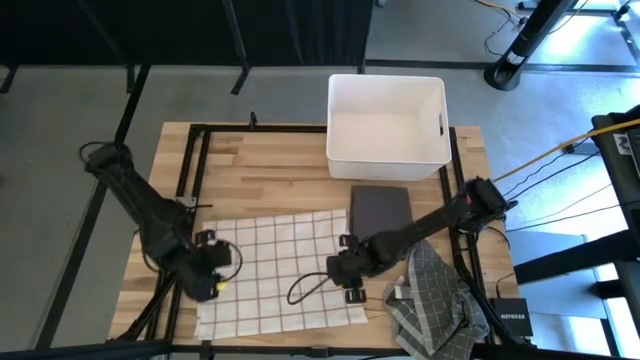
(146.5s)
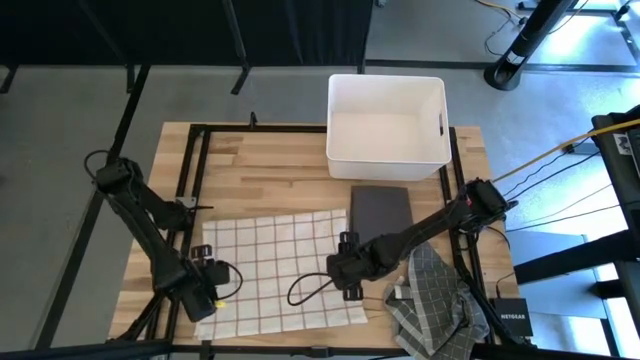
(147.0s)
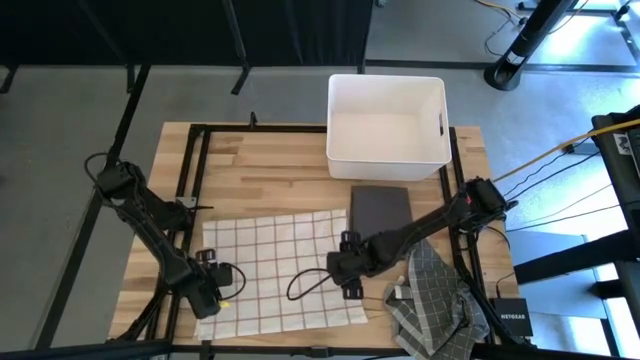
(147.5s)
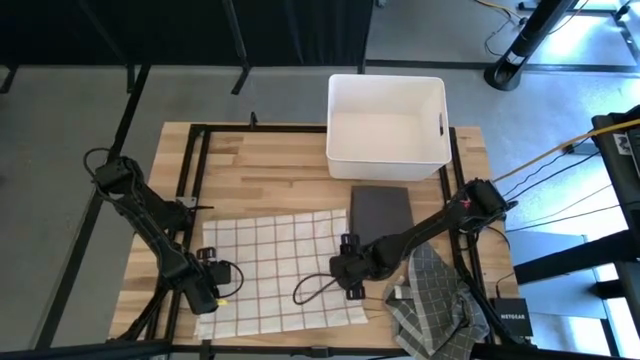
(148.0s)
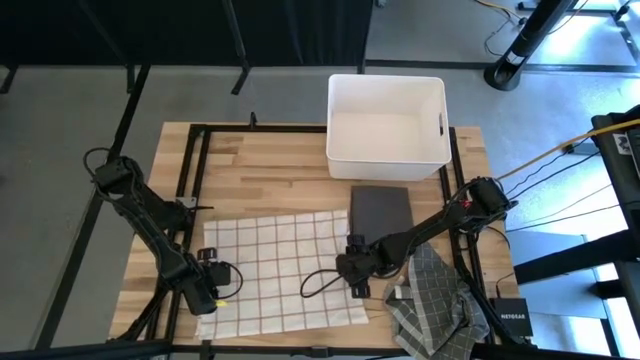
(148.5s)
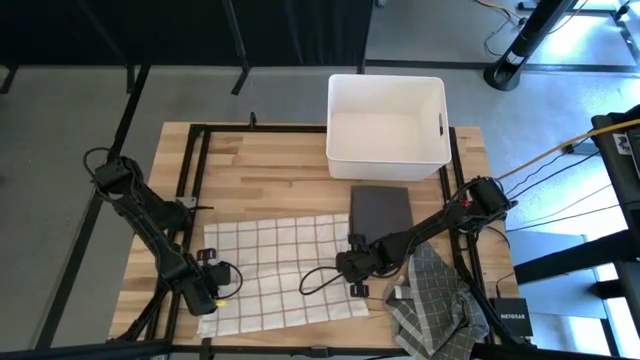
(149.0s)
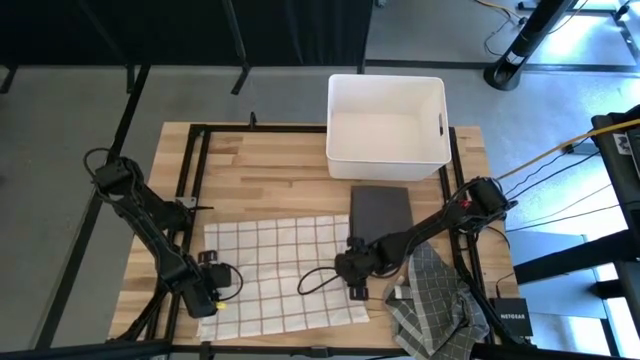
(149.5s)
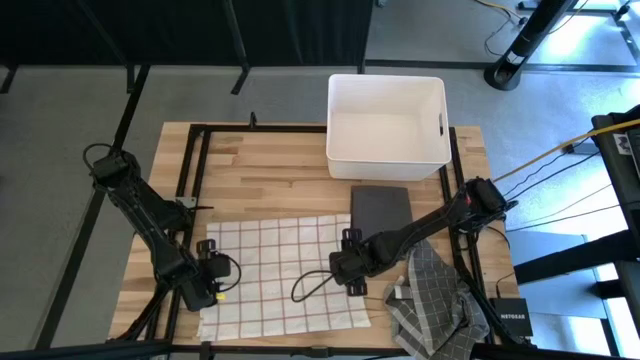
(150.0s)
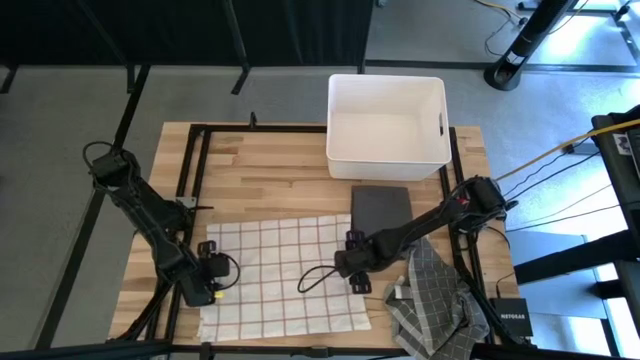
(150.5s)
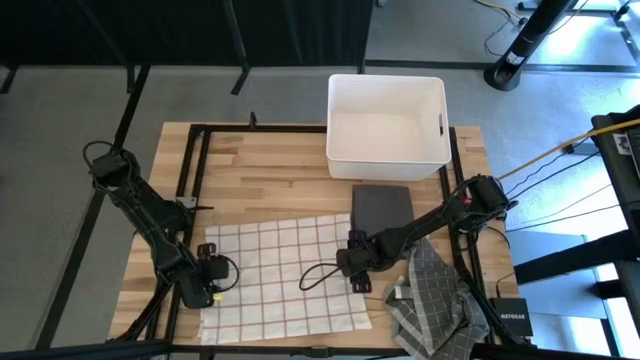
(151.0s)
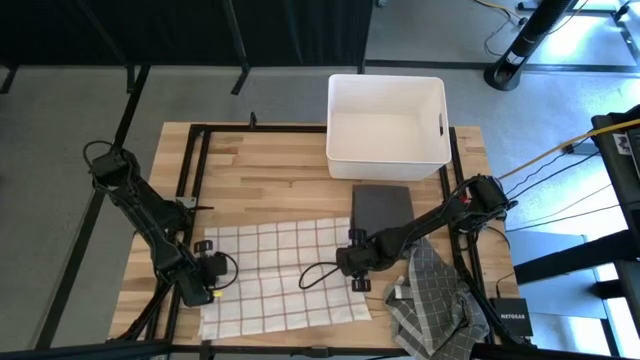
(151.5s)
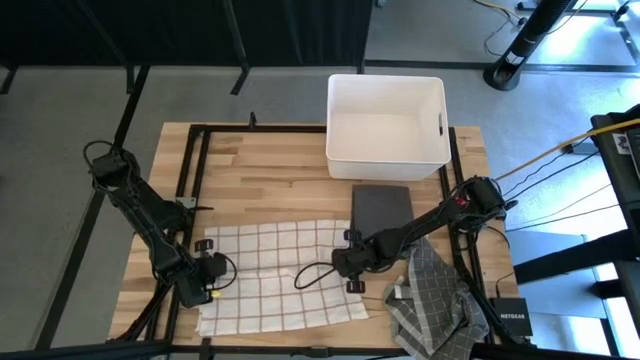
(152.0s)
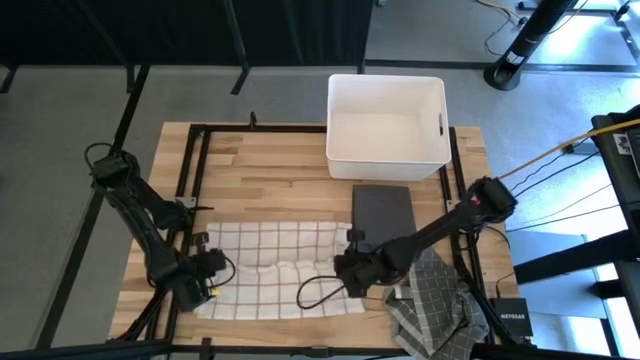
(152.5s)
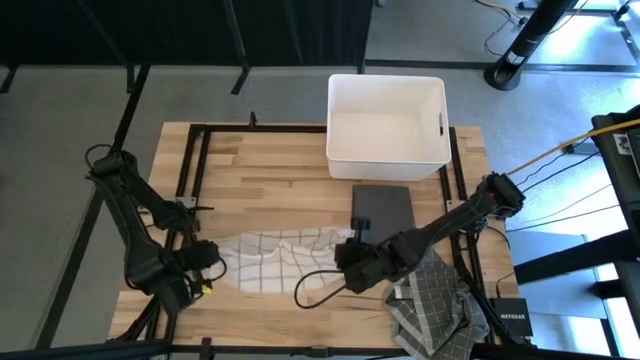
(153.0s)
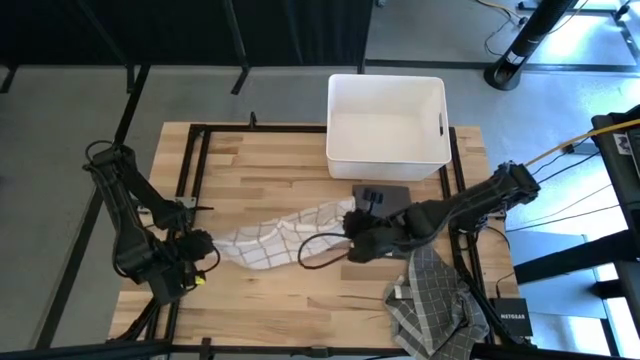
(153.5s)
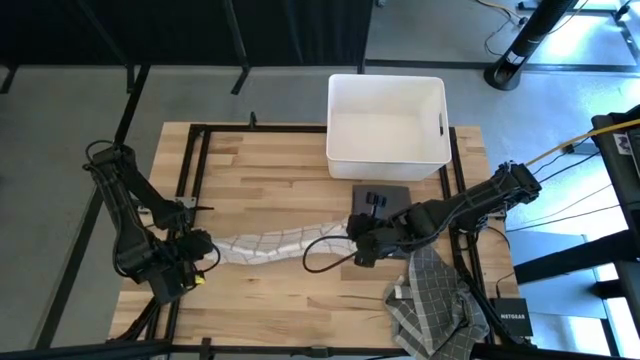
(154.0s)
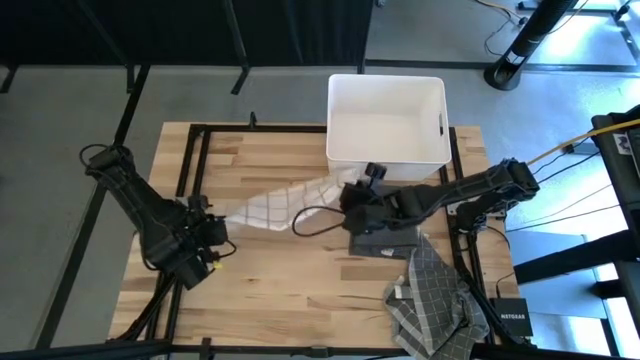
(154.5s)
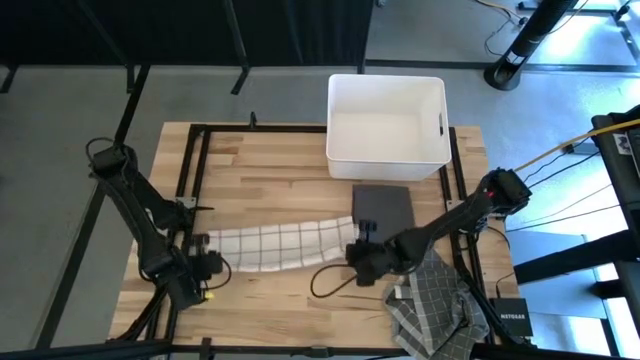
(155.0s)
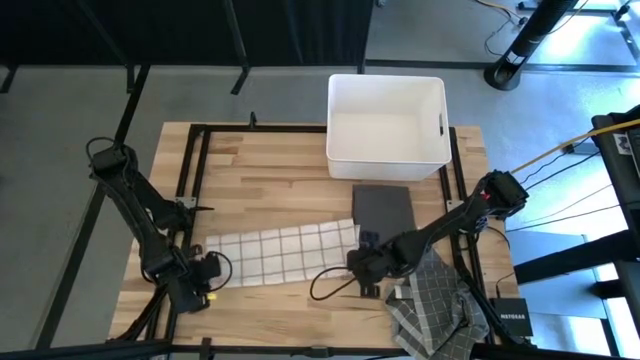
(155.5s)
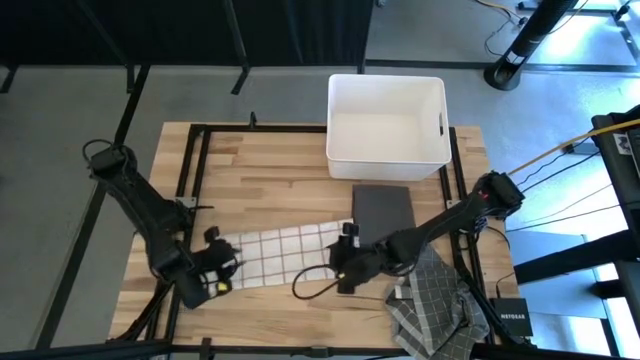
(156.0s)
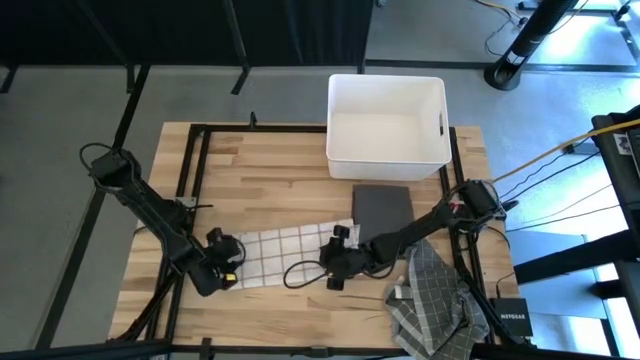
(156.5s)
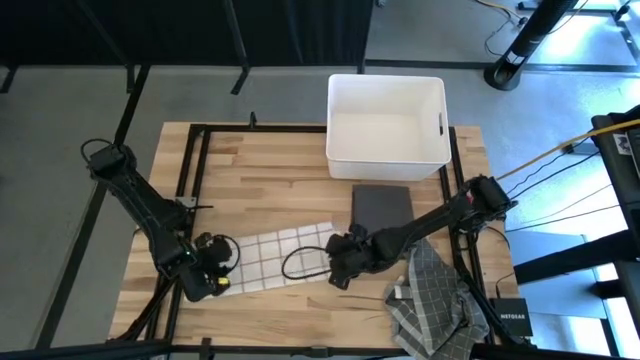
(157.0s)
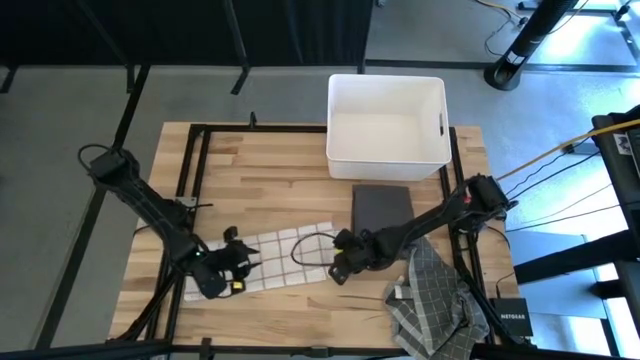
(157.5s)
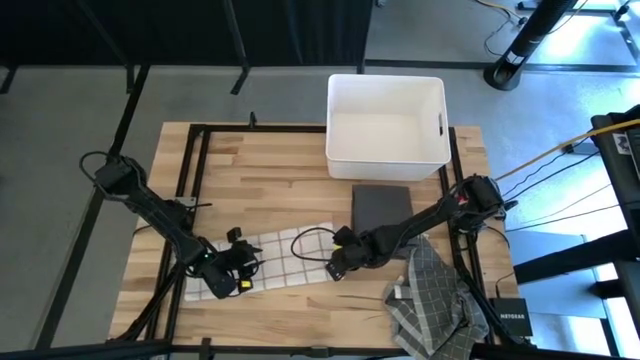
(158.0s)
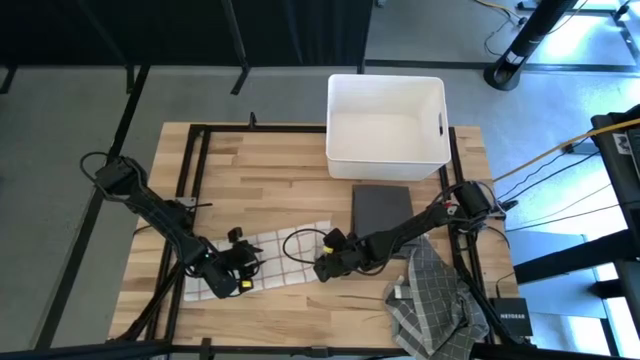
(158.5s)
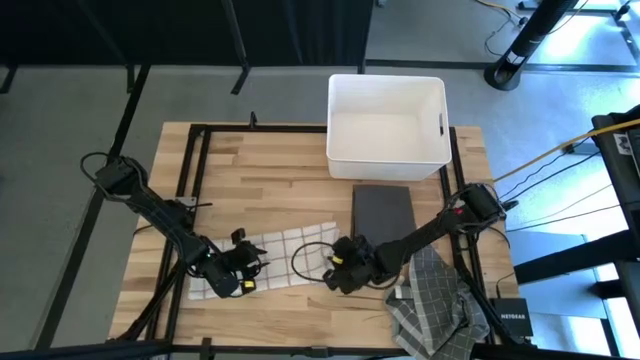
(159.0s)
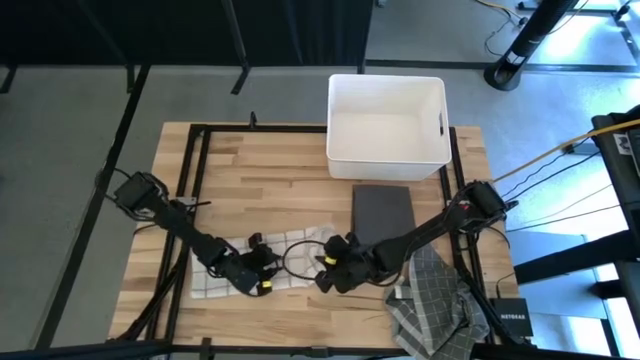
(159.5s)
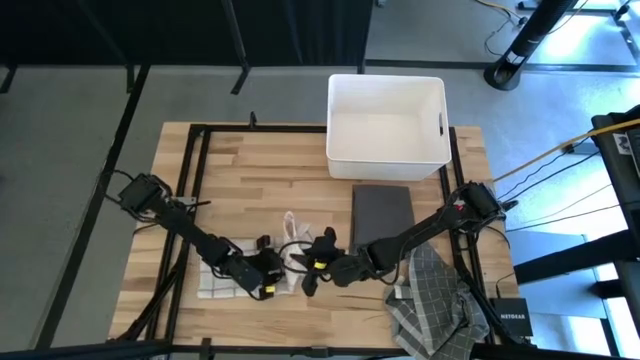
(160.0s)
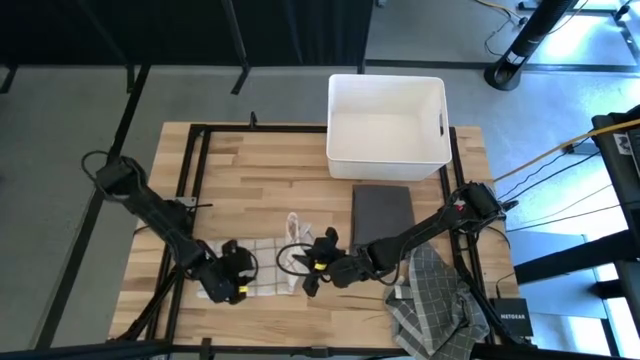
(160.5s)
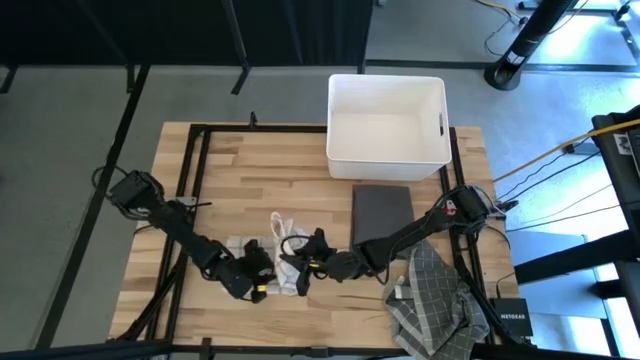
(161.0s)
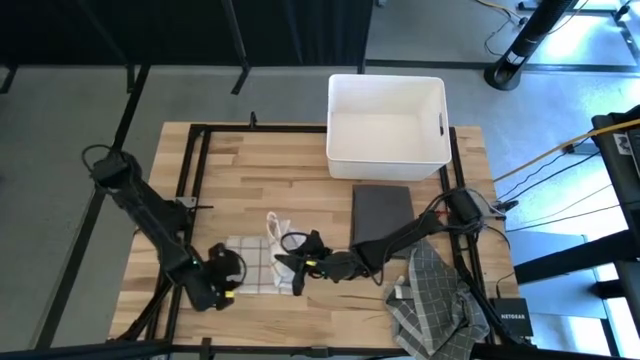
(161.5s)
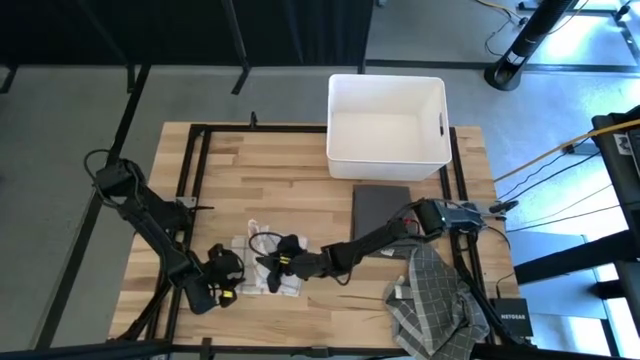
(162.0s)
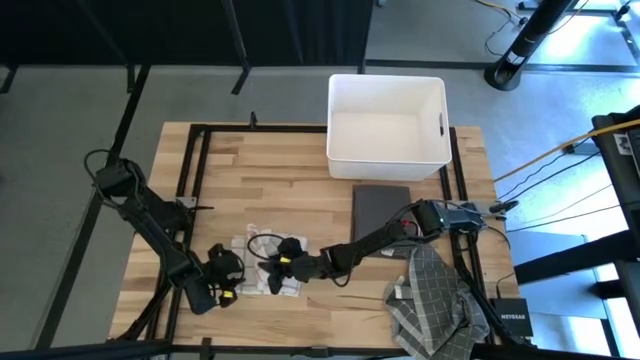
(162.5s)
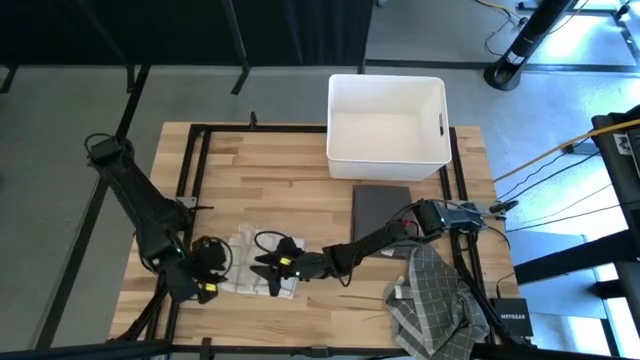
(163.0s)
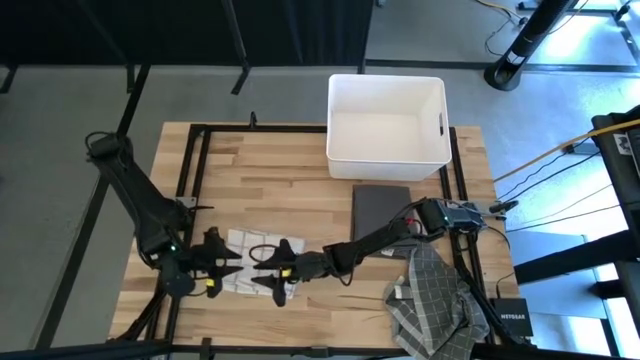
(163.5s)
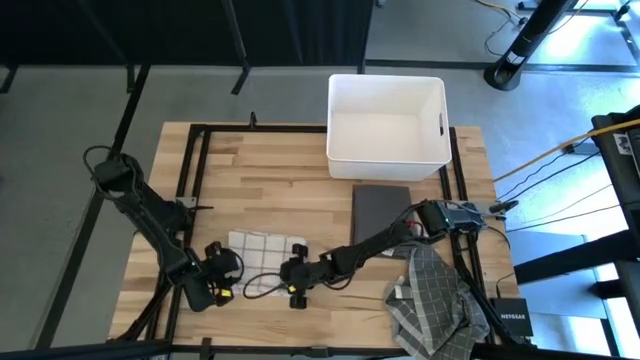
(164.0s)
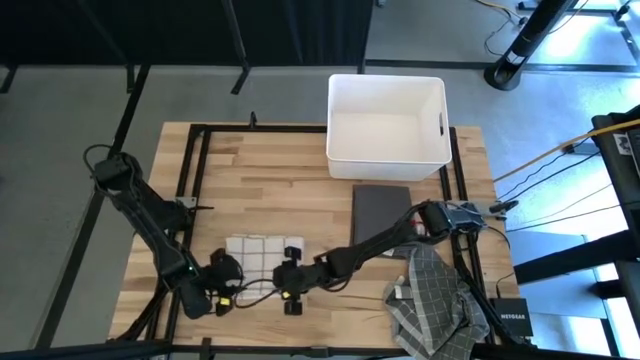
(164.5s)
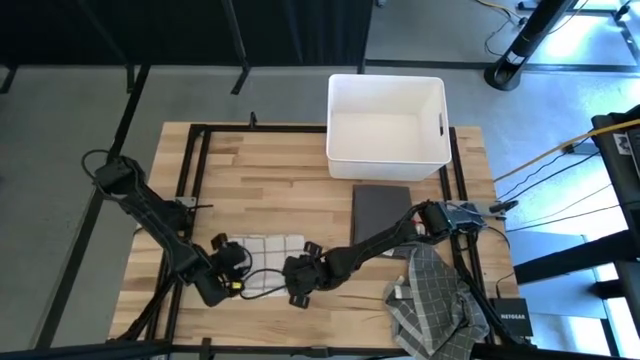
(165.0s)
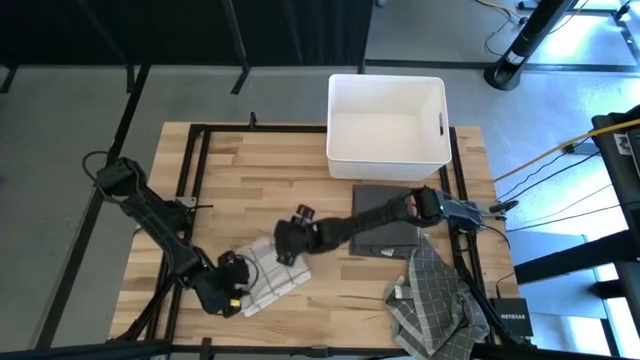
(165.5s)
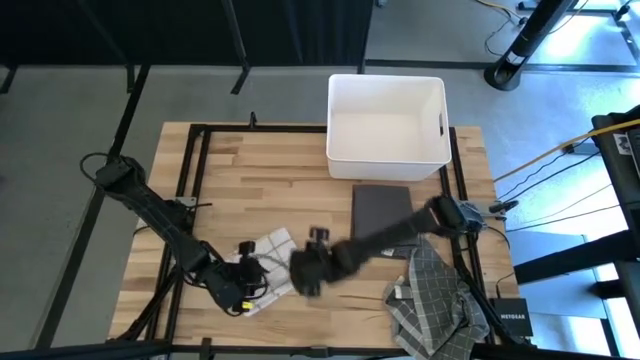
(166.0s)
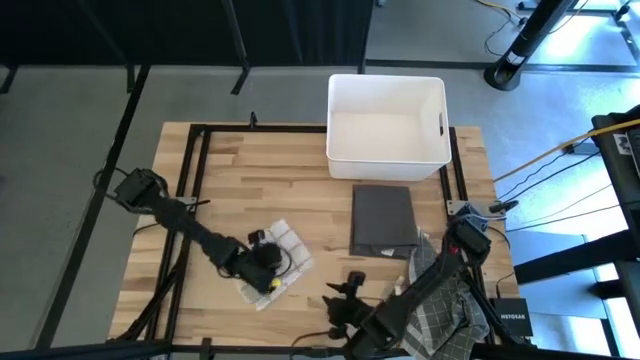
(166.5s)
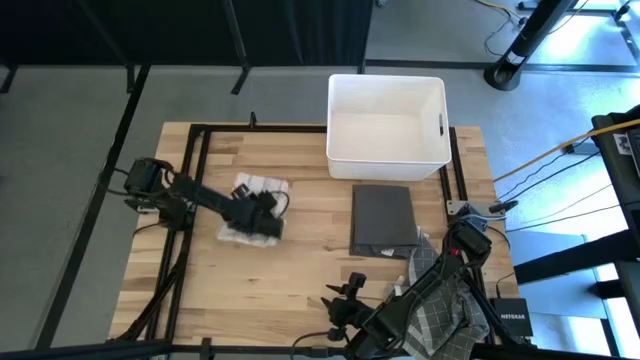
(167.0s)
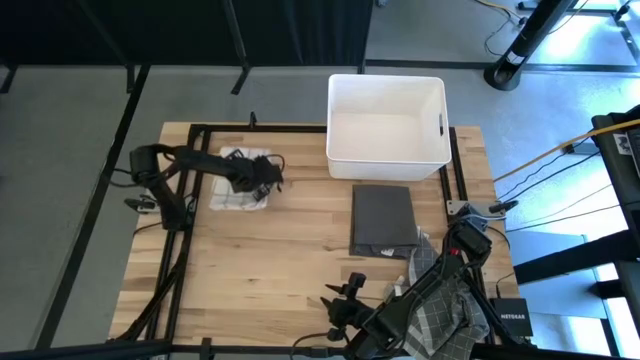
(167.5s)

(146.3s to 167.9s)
Task: Fold towel
Fold the white towel
